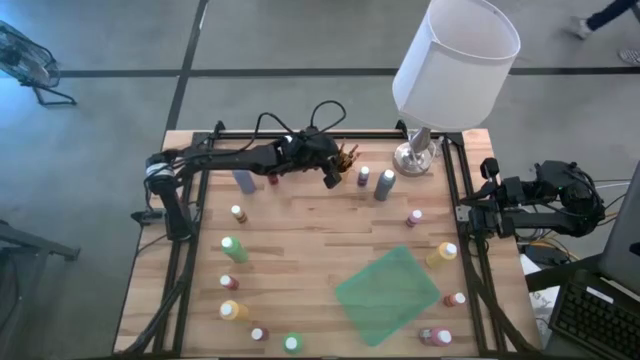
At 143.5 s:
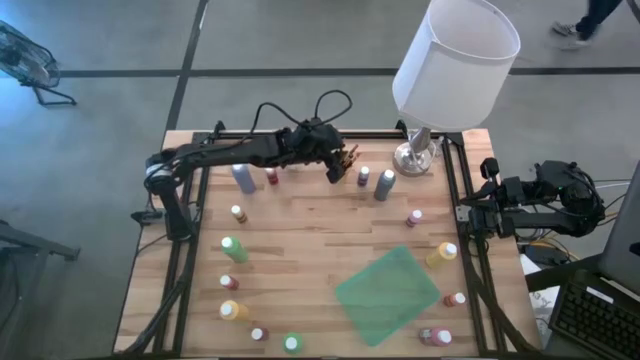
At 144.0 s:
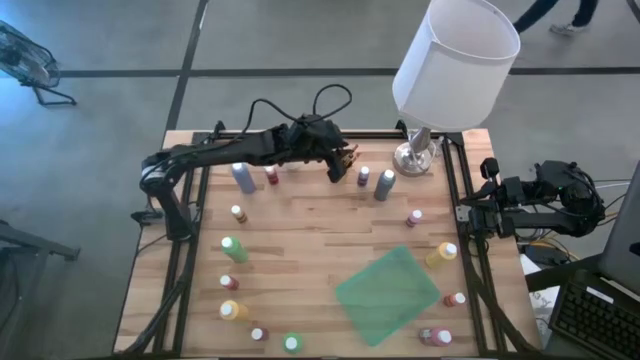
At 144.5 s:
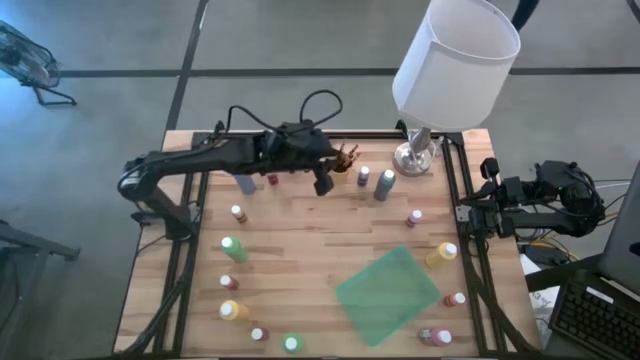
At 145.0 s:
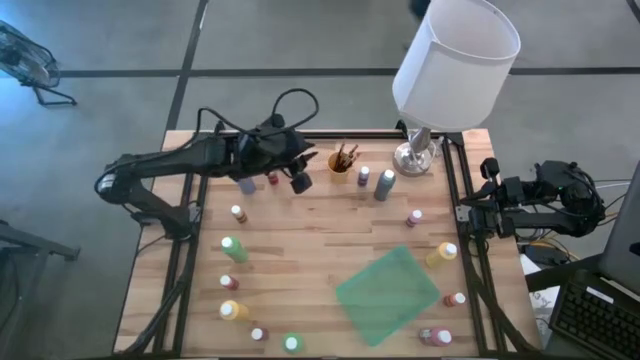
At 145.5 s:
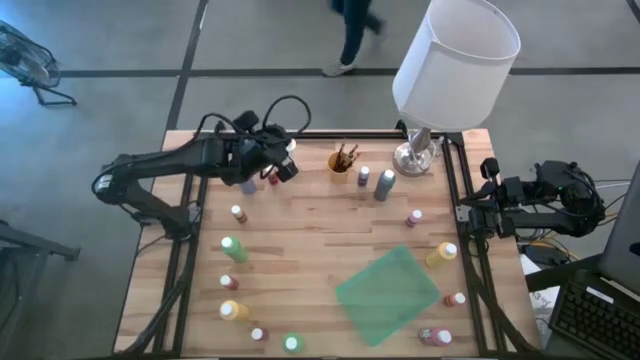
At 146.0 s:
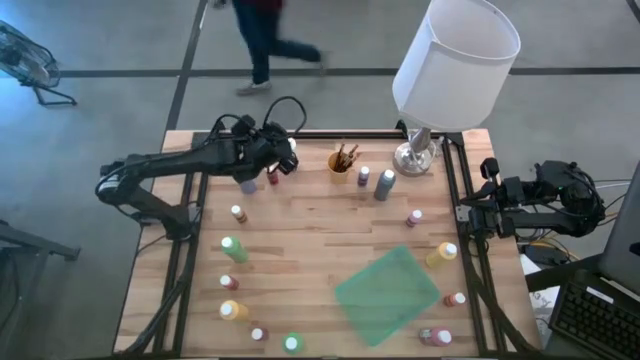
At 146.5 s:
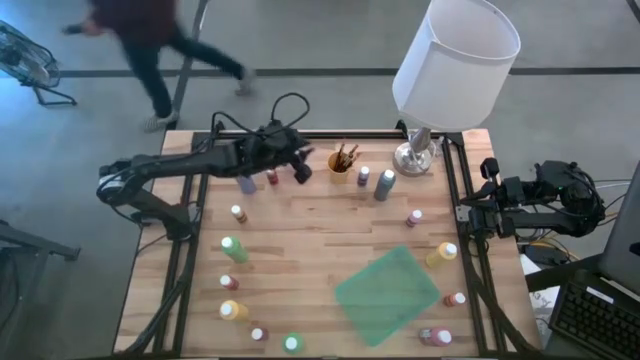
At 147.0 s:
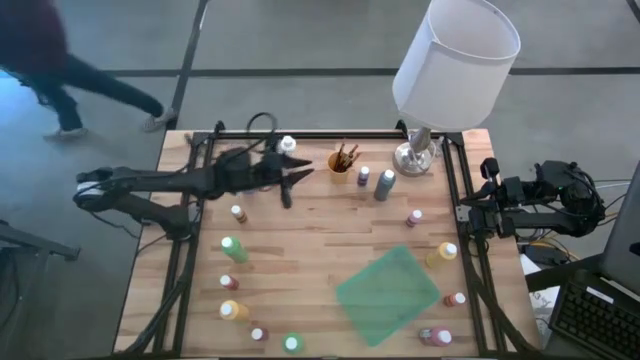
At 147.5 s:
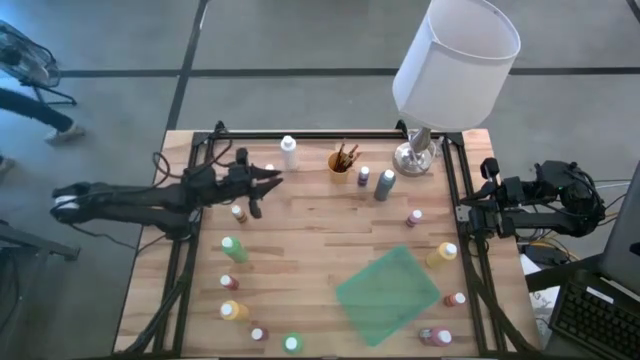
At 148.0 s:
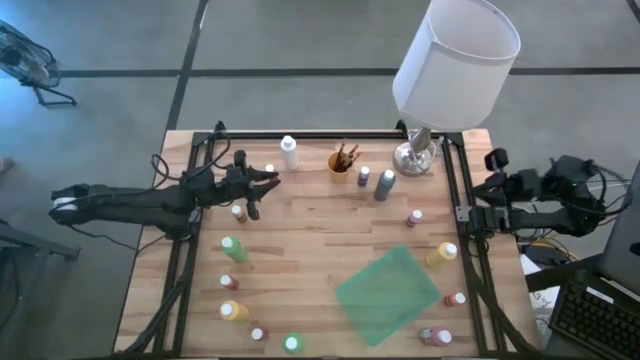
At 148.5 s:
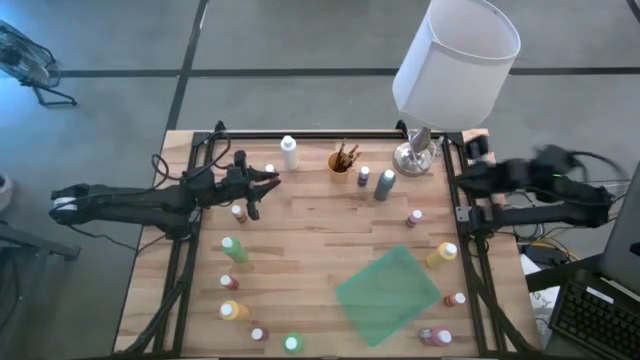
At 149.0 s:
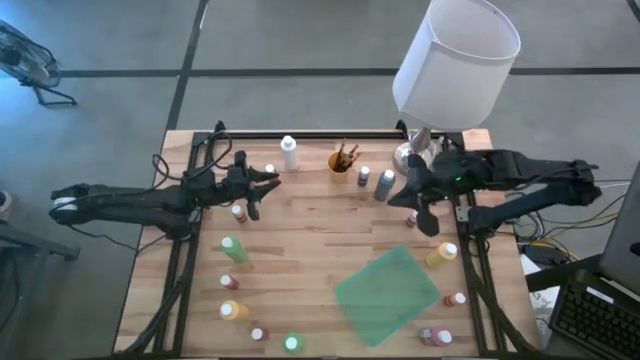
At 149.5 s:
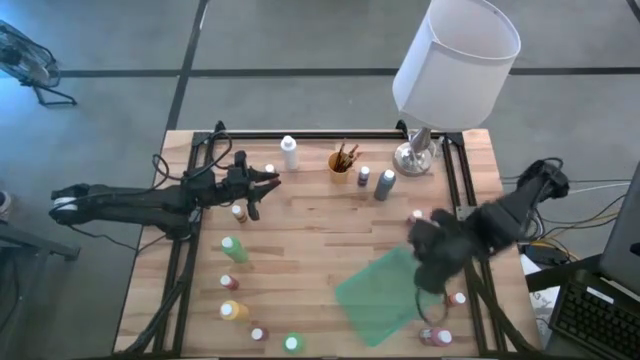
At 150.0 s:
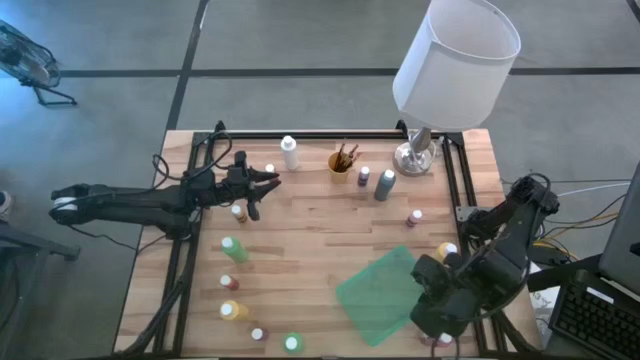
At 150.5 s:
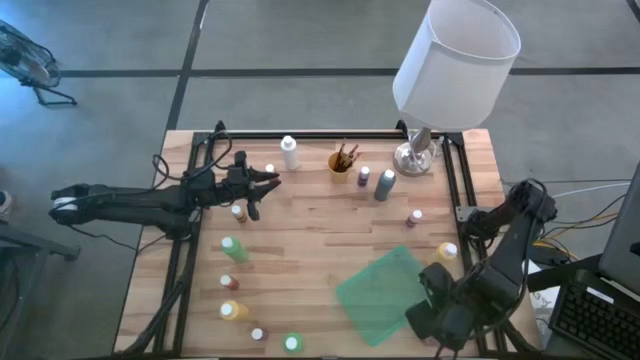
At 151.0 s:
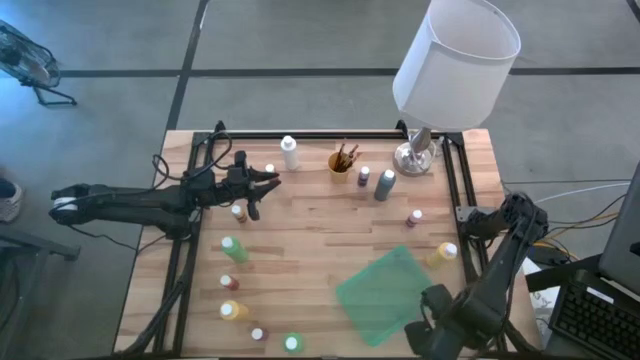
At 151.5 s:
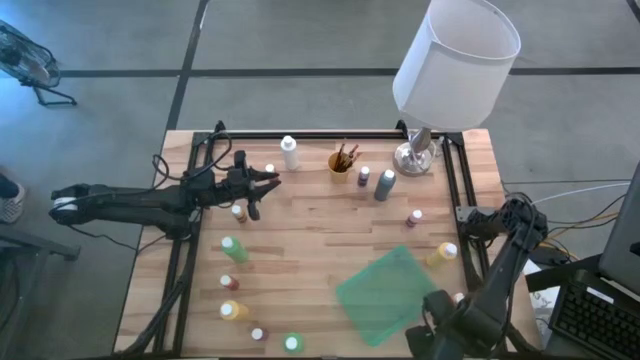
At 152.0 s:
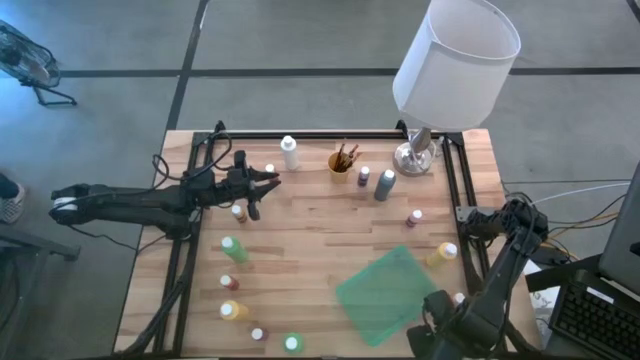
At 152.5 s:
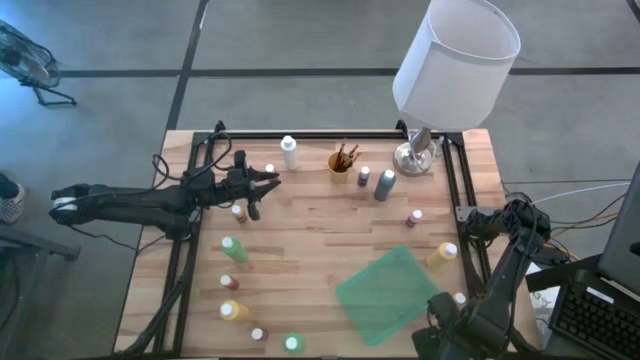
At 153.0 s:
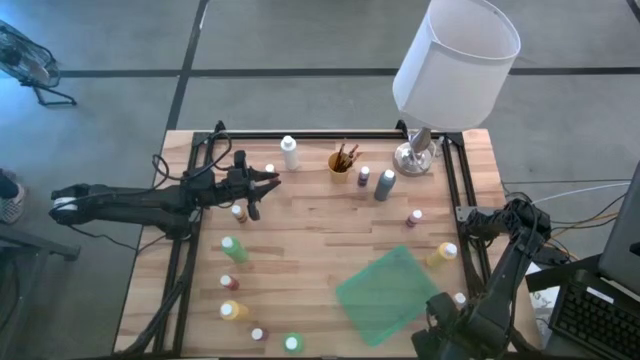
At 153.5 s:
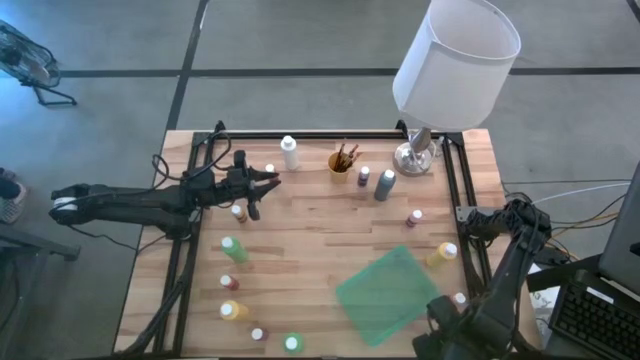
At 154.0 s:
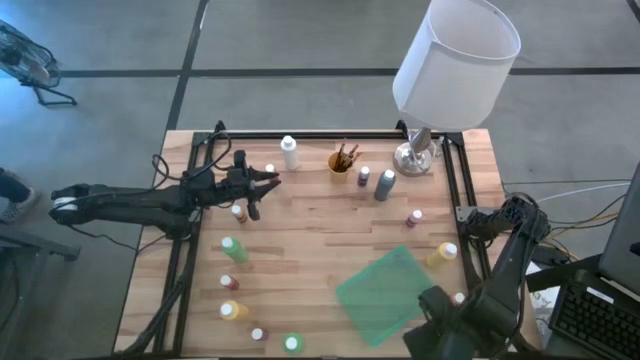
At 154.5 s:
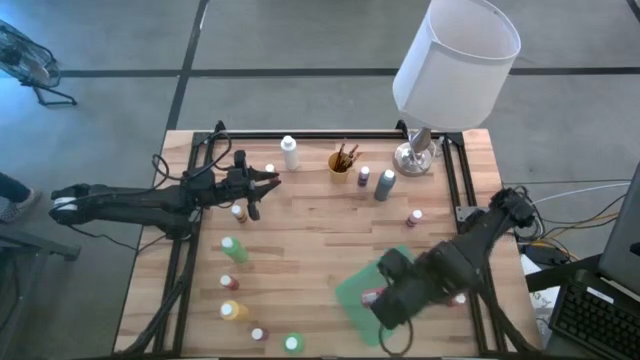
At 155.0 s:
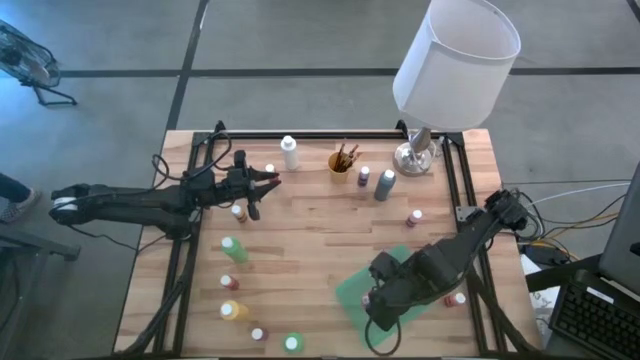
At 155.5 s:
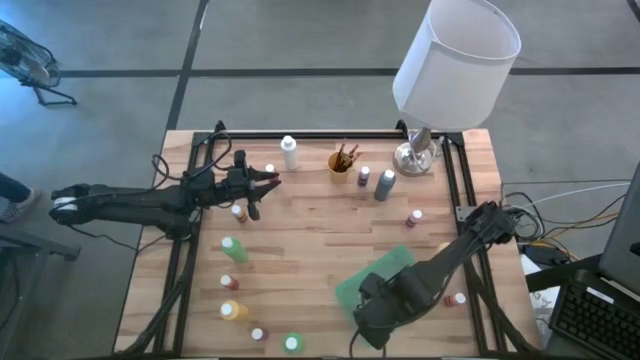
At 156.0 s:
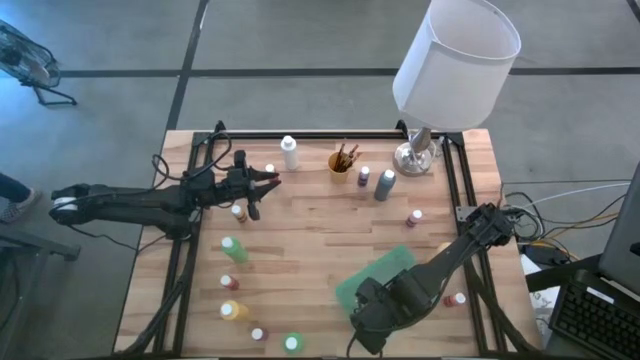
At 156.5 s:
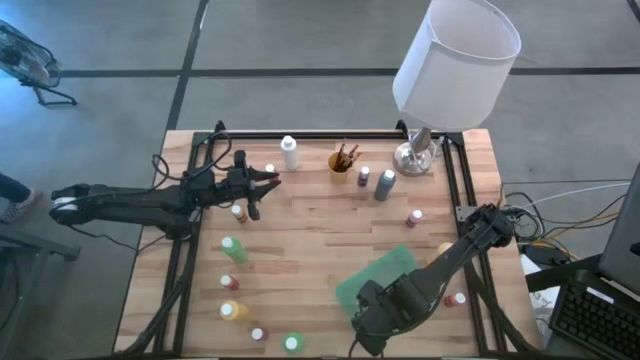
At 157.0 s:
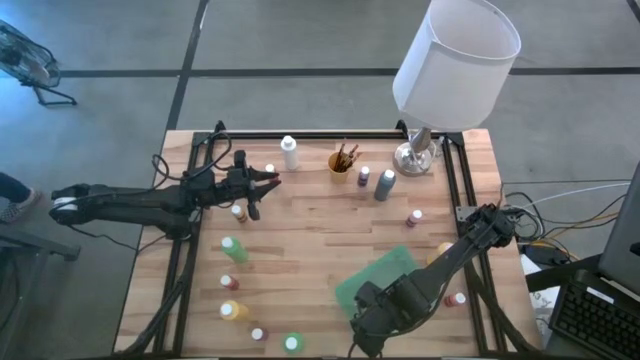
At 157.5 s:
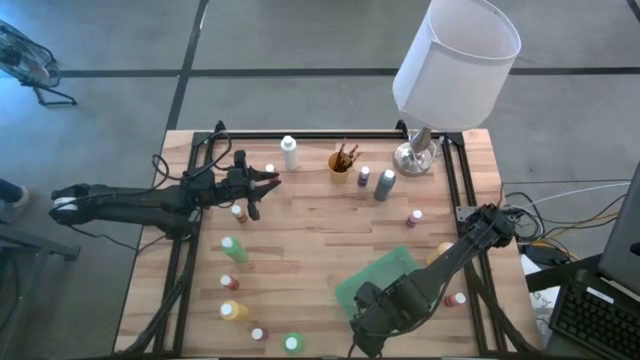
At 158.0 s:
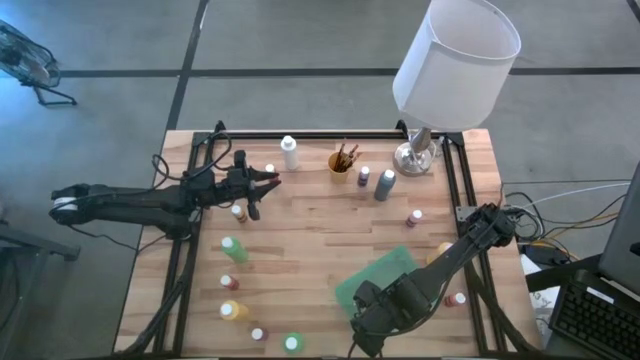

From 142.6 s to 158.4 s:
Task: Pick & Place Paint Supplies
Put the big pink paint bottle into the green bin

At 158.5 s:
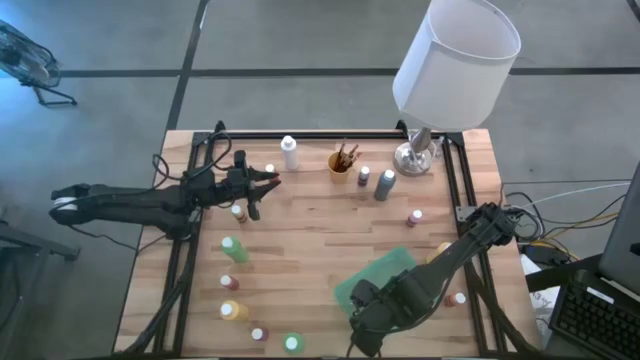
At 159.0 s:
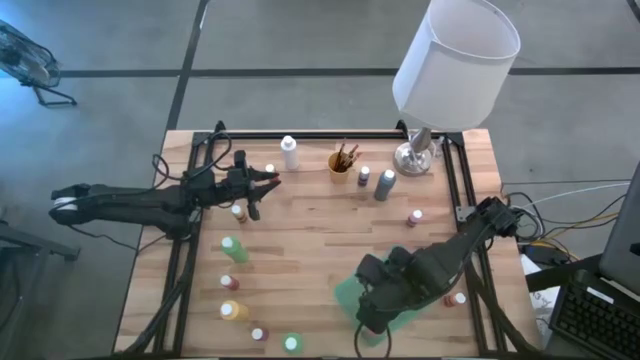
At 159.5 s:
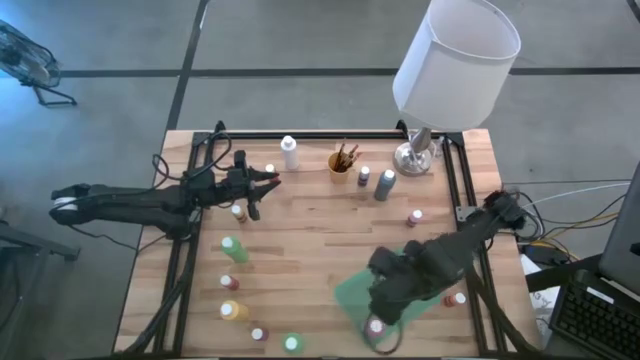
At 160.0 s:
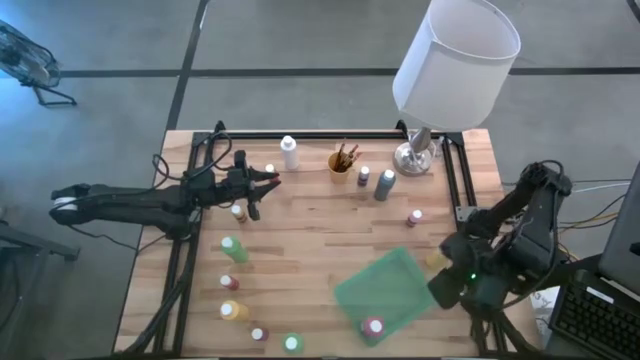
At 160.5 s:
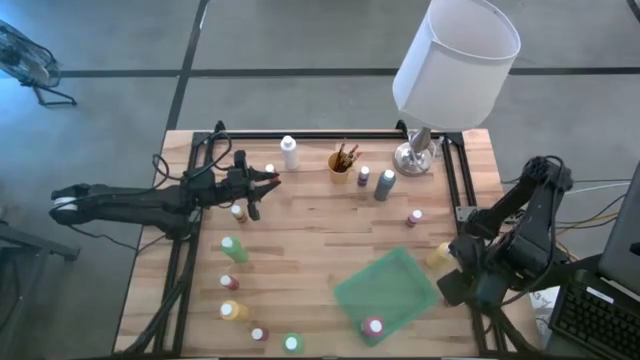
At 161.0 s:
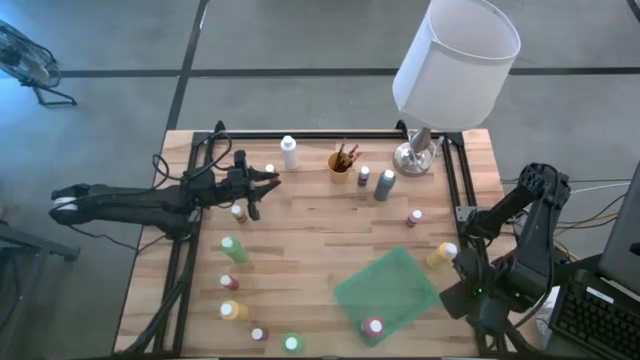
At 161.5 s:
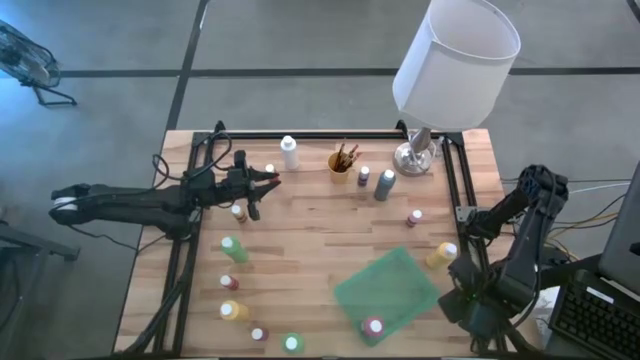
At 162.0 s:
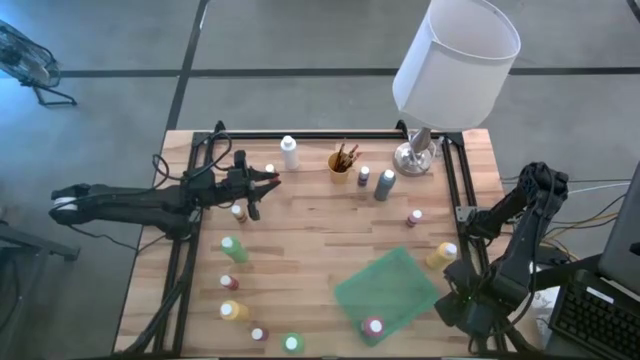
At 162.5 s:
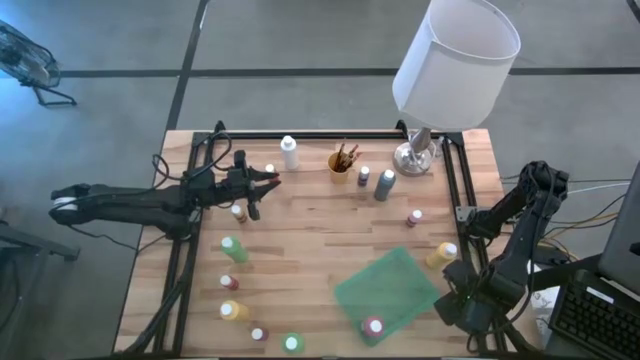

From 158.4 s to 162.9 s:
Put the orange paint bottle into the green bin

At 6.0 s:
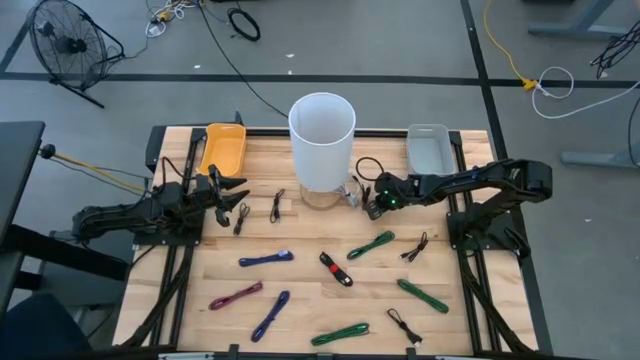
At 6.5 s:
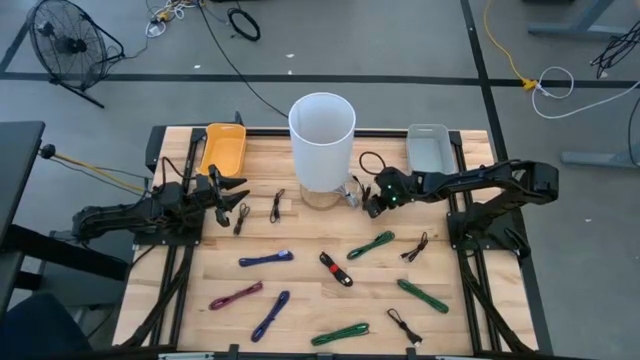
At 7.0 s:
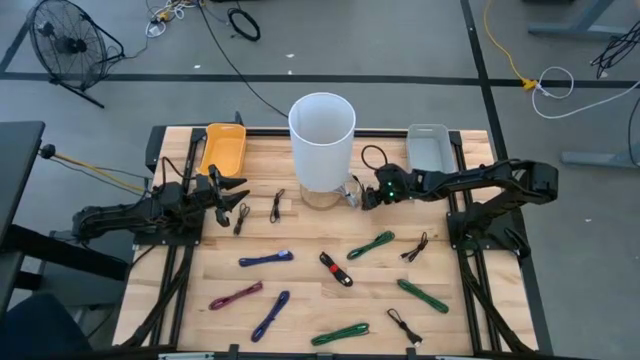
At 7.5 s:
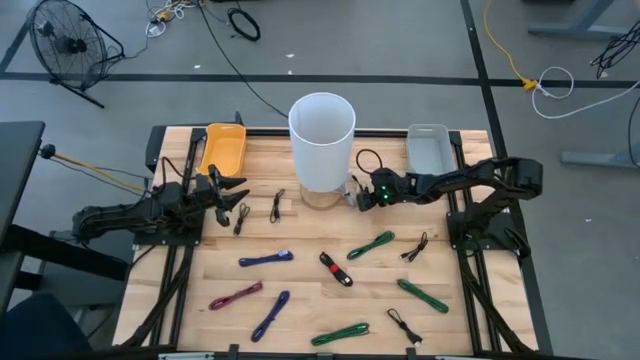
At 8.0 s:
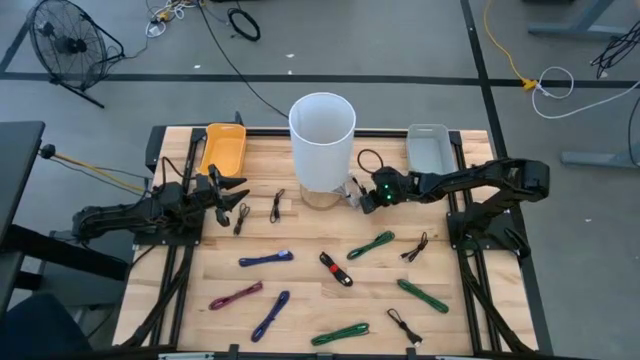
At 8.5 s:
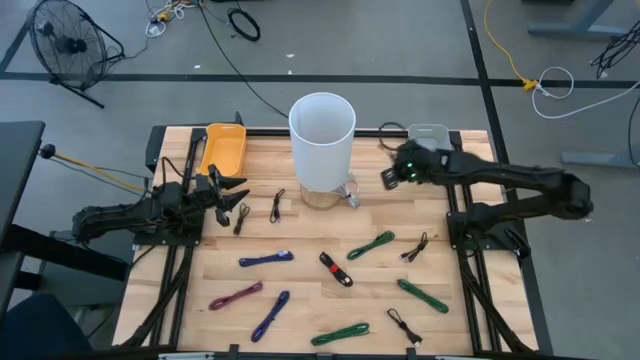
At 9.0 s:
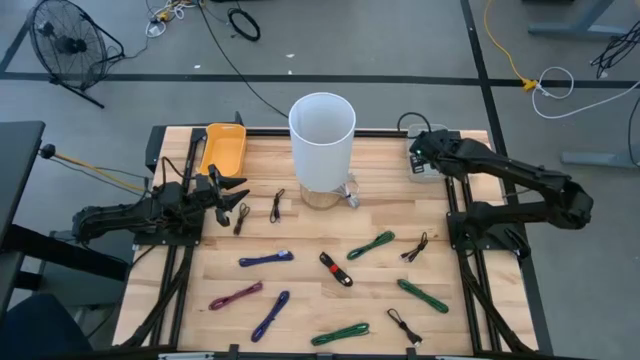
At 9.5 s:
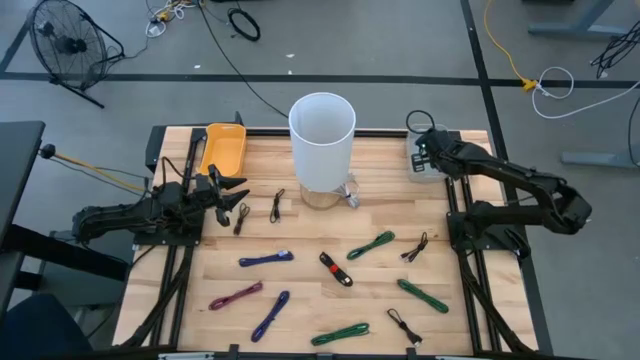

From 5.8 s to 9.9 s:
Task: Pick & Place USB Port
Put the black USB cable into the gray bin
